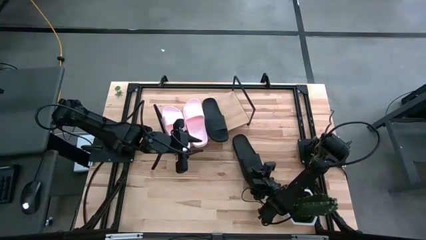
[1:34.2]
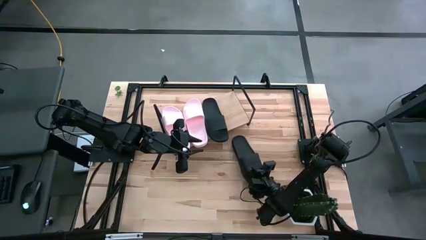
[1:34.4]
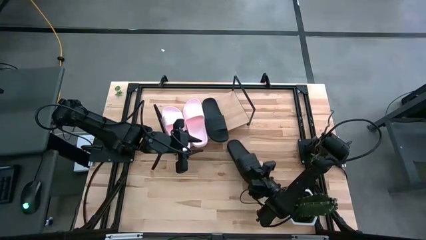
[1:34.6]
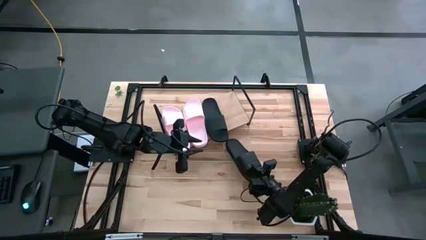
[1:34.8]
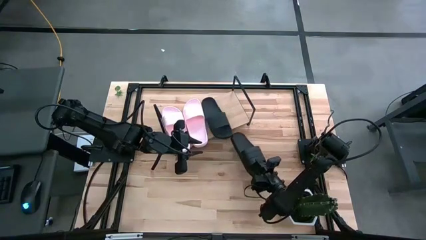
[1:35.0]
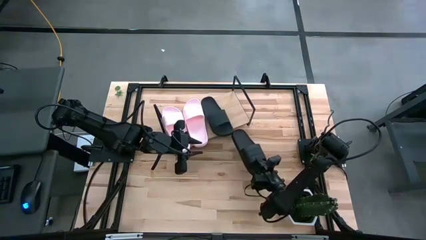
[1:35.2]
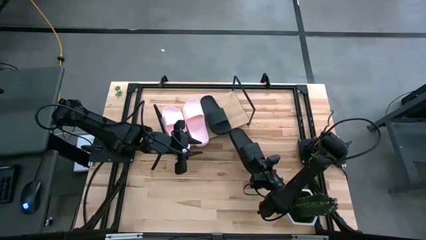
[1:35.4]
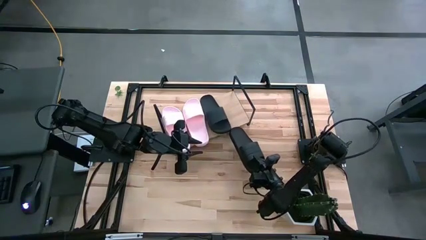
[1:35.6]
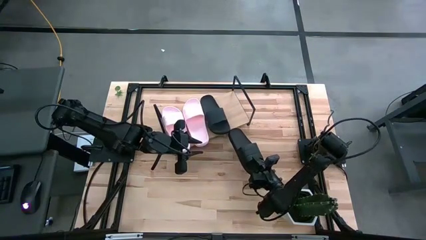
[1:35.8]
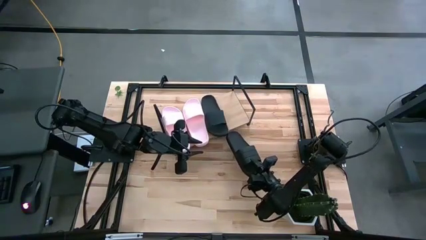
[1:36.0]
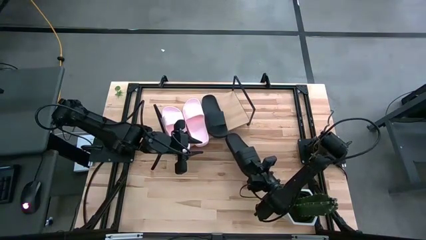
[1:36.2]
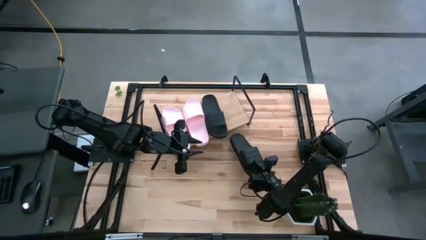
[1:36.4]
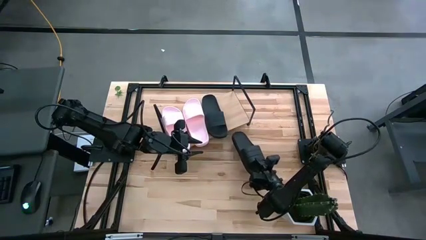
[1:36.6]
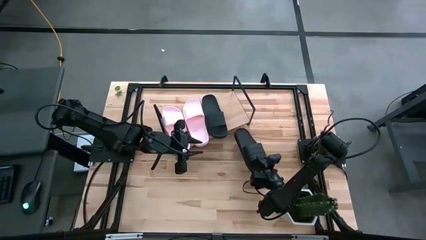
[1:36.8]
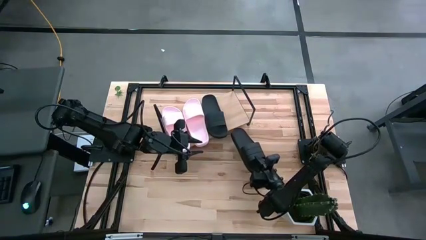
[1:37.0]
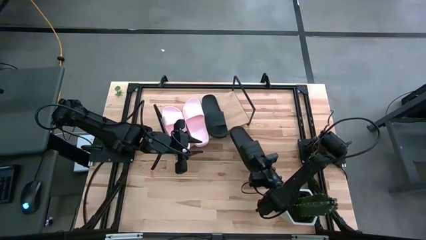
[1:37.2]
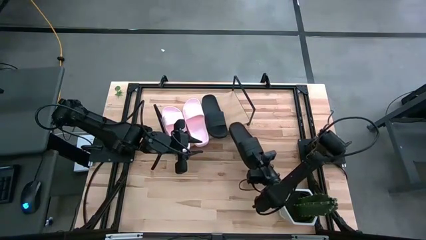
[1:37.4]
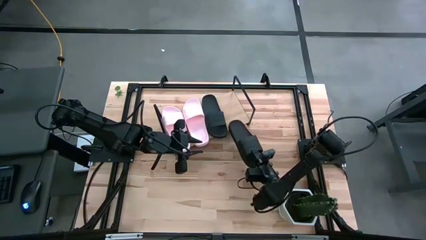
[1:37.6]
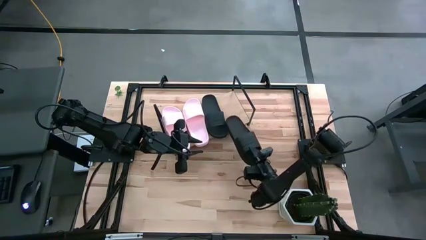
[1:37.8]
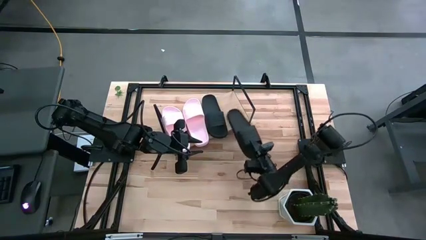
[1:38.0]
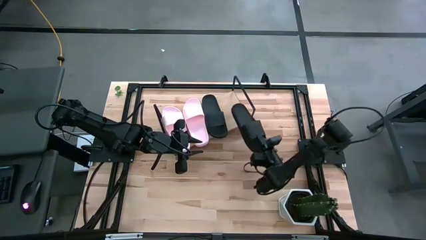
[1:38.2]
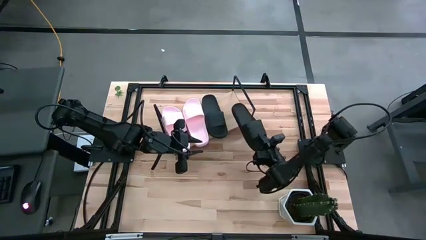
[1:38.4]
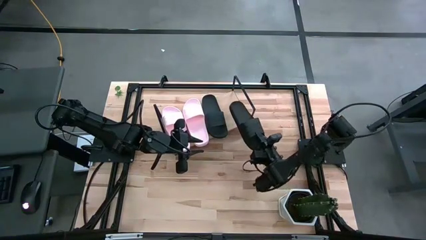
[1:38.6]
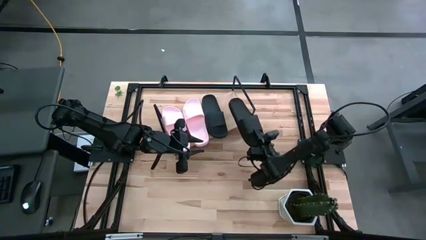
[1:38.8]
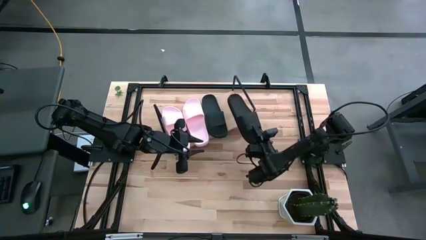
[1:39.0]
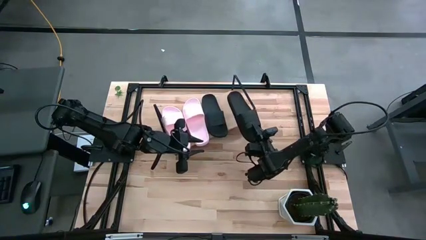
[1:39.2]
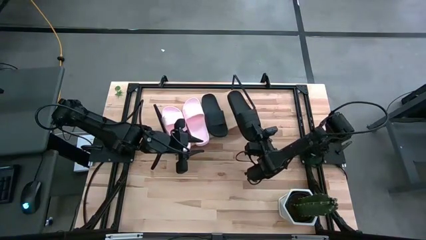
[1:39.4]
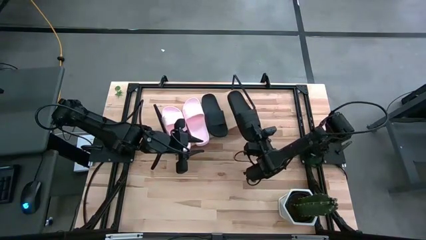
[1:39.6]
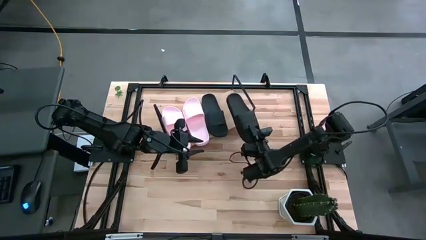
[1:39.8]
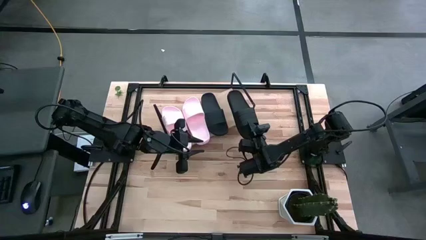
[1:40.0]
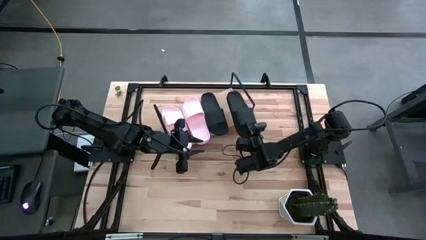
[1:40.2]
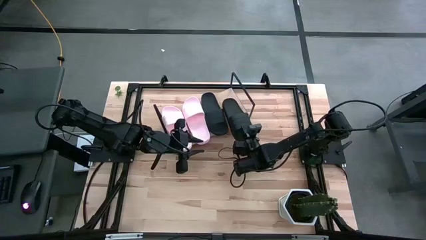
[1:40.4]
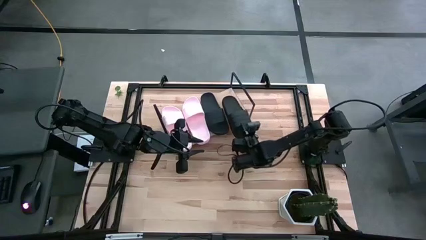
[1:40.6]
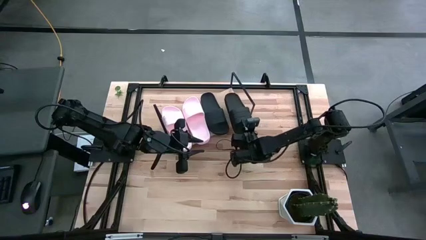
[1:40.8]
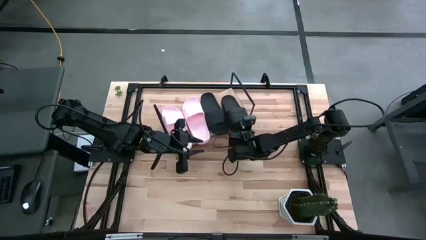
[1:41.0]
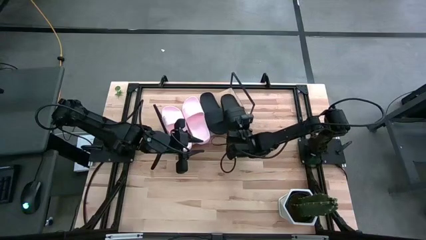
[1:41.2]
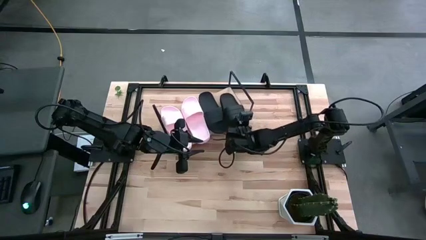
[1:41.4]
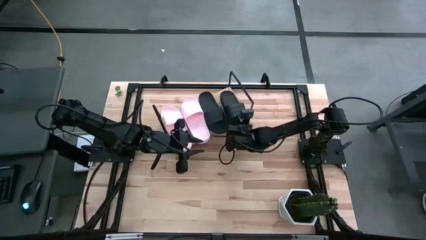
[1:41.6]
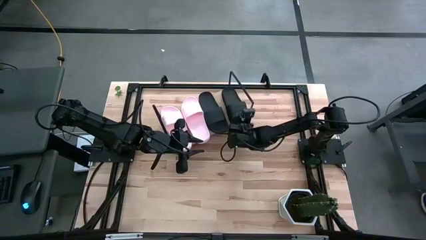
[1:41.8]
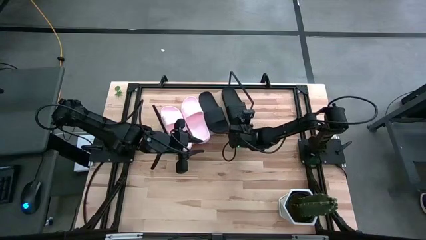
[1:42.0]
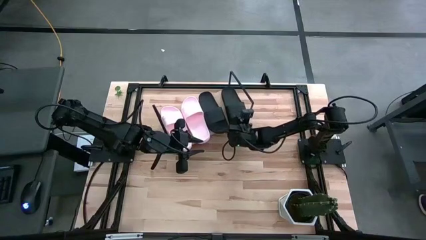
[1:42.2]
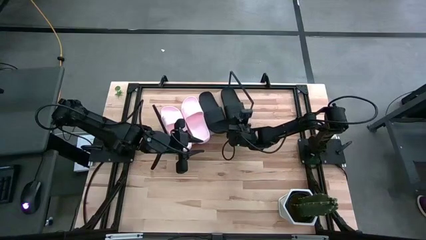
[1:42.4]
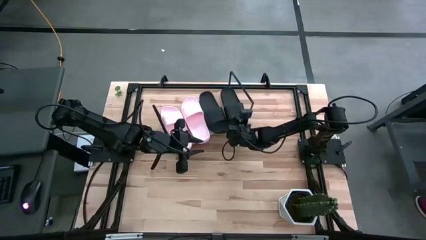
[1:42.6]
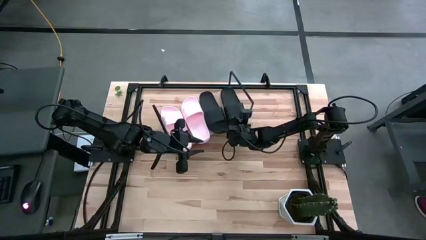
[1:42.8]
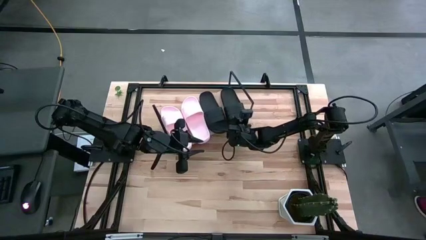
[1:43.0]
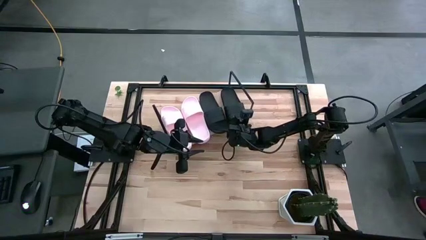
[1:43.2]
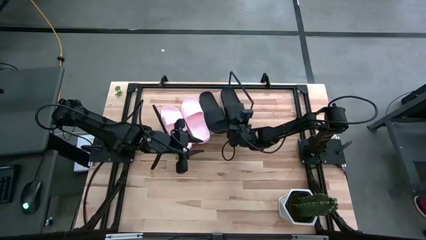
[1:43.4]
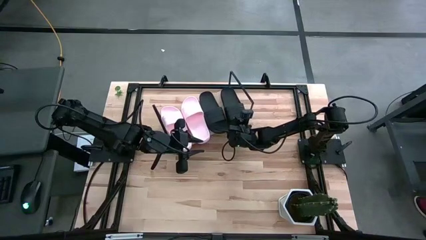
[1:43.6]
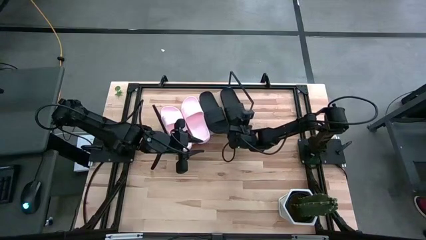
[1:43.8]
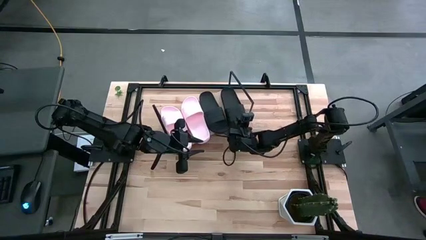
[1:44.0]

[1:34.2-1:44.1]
Task: Pick and place slides into the shelf
Put the black slide on the shelf
